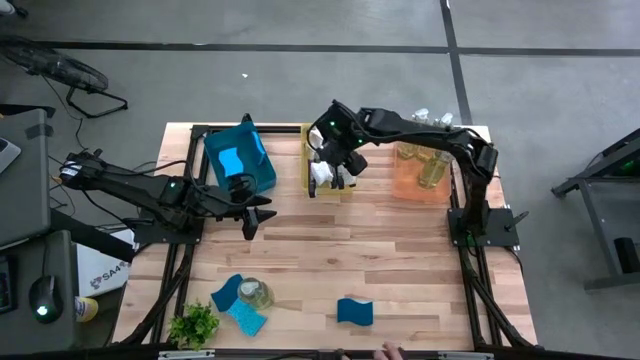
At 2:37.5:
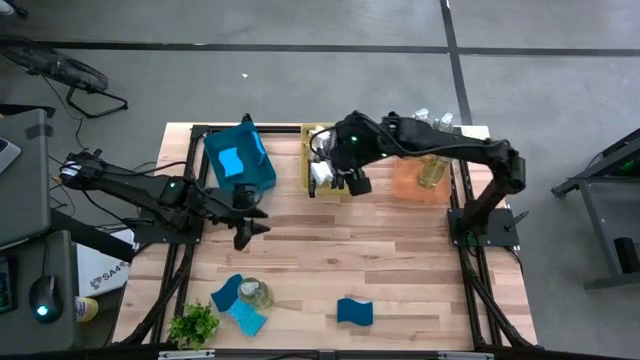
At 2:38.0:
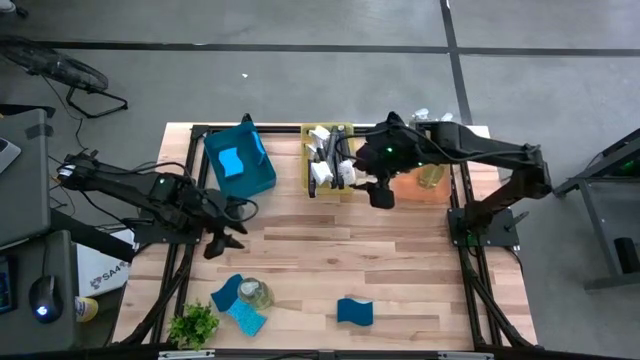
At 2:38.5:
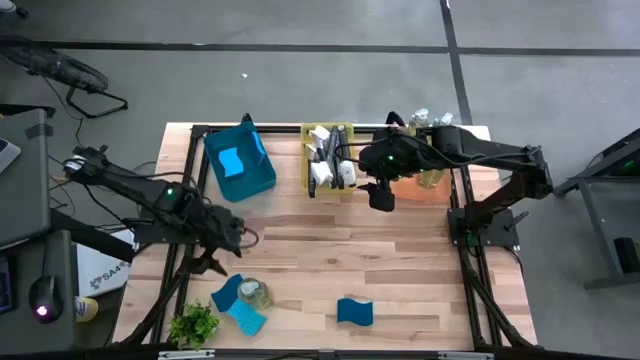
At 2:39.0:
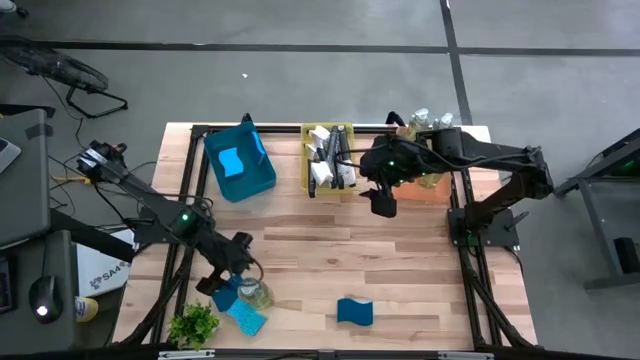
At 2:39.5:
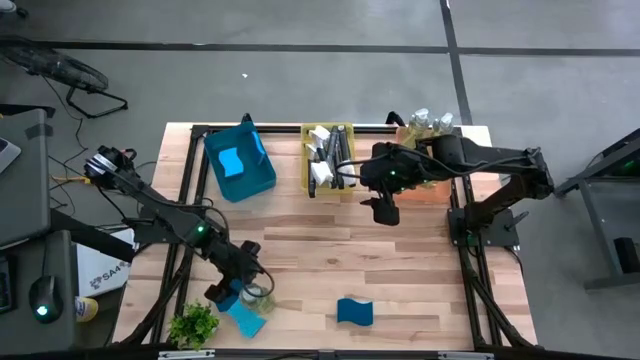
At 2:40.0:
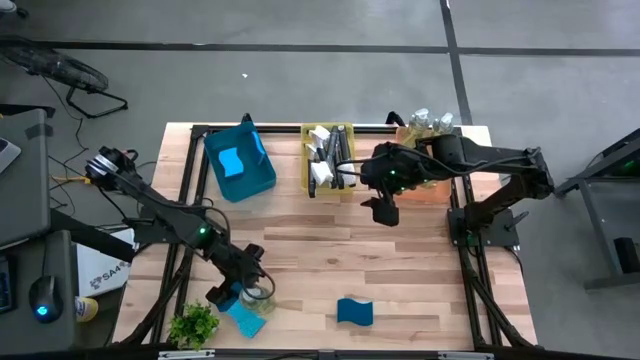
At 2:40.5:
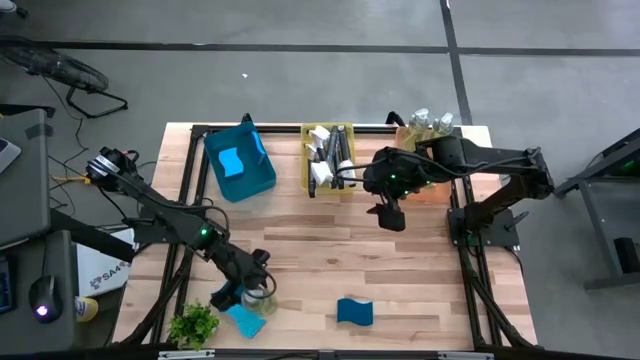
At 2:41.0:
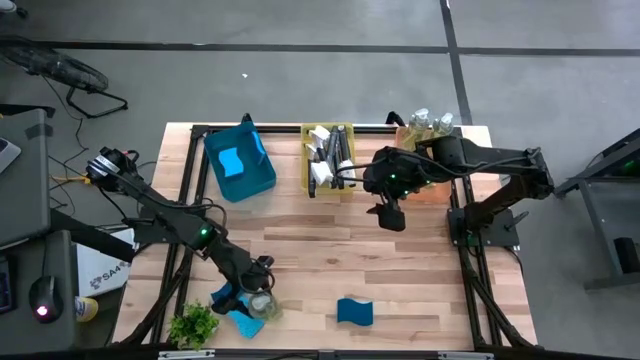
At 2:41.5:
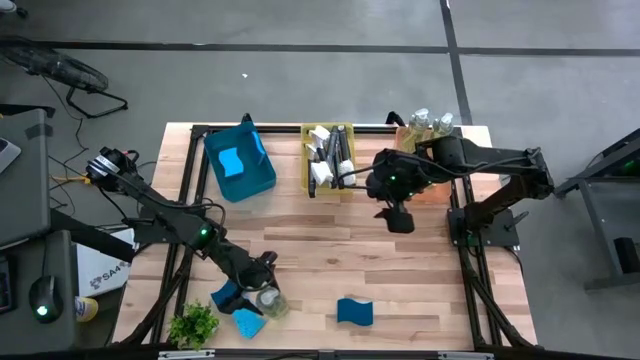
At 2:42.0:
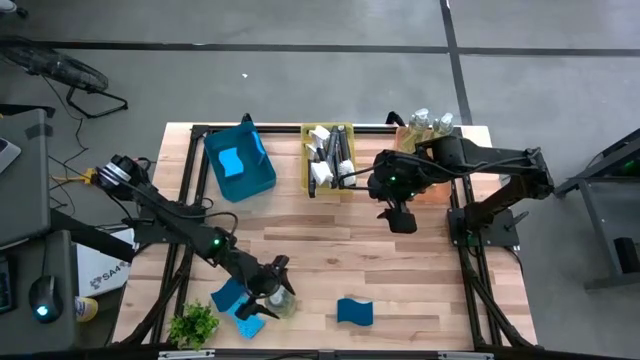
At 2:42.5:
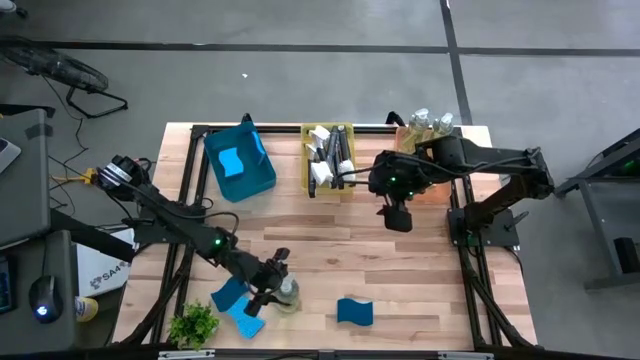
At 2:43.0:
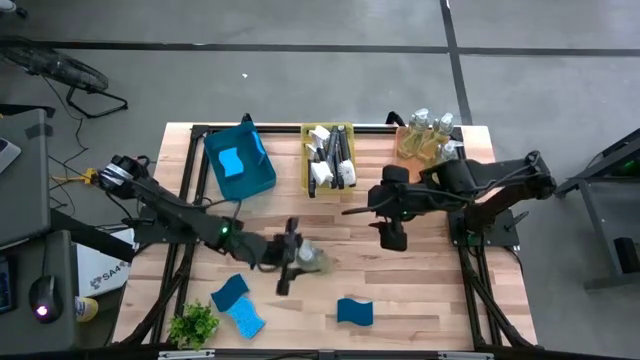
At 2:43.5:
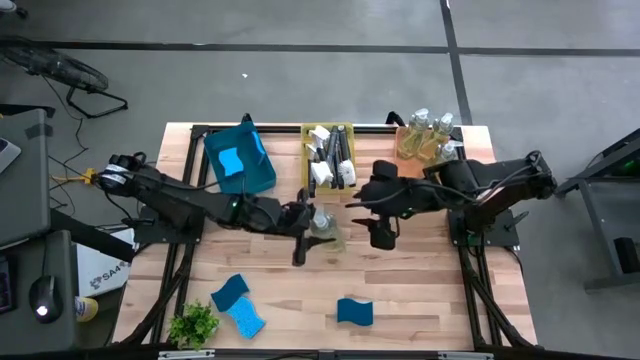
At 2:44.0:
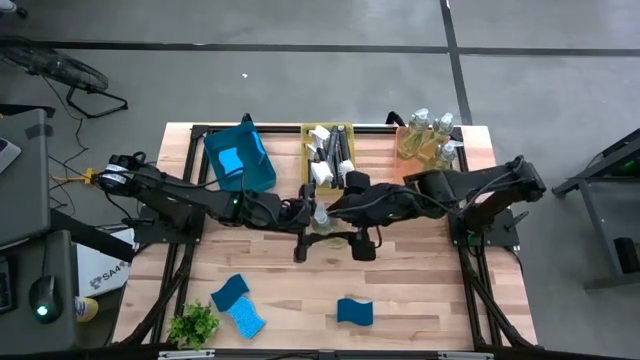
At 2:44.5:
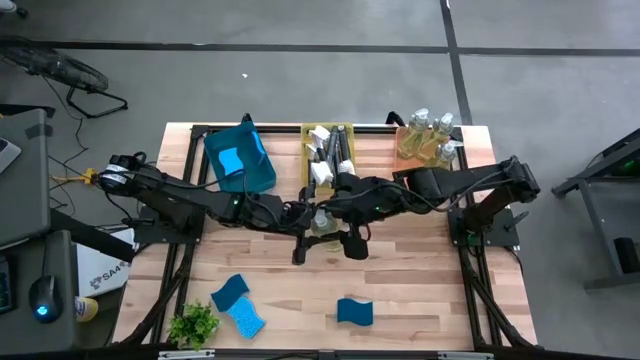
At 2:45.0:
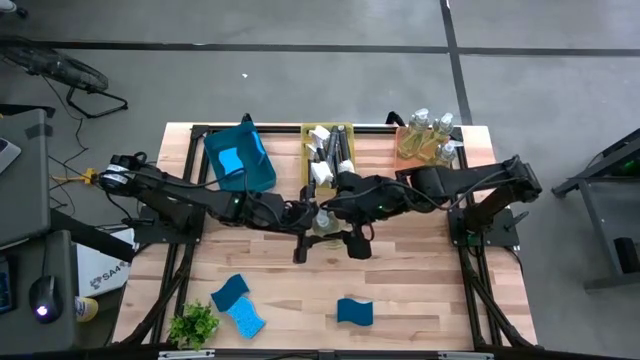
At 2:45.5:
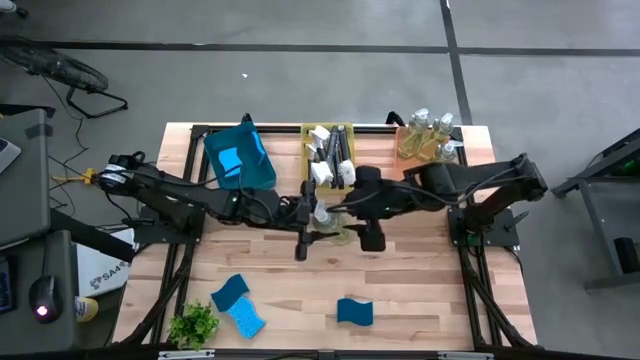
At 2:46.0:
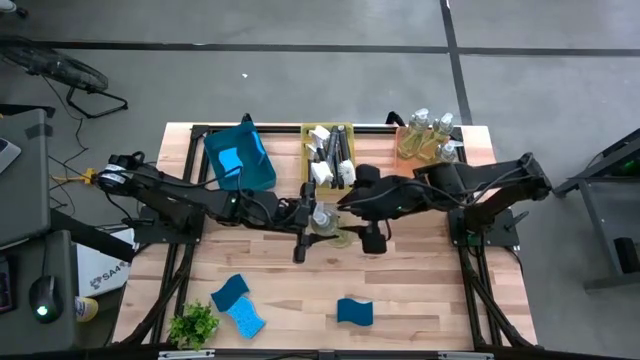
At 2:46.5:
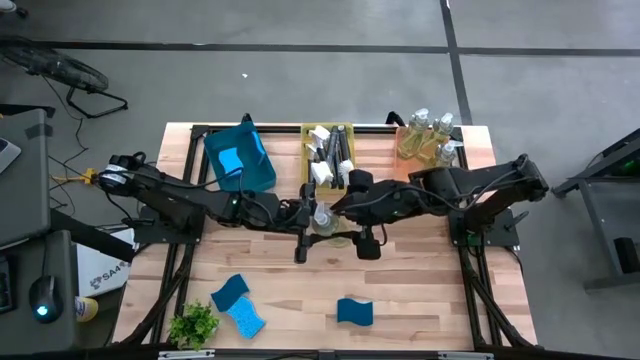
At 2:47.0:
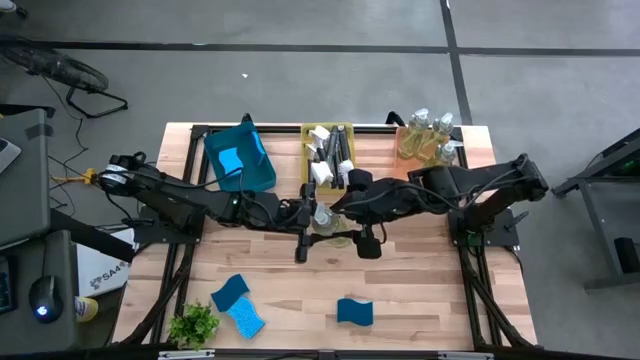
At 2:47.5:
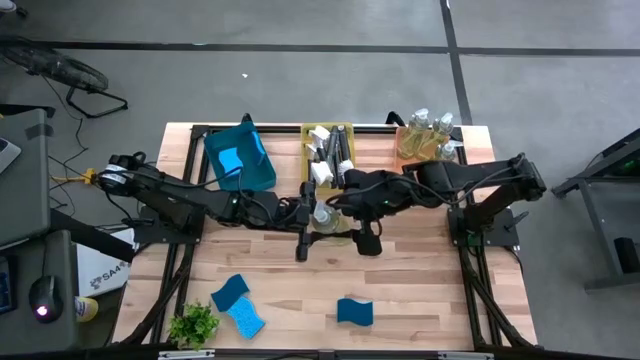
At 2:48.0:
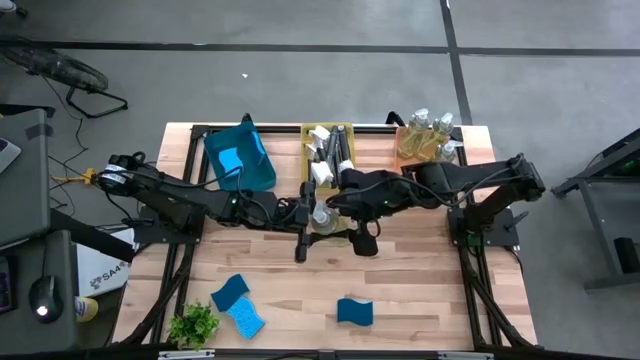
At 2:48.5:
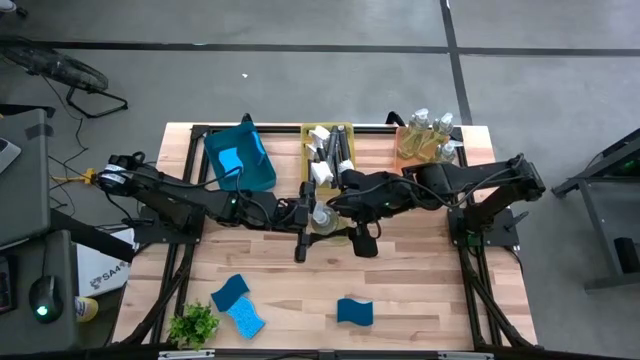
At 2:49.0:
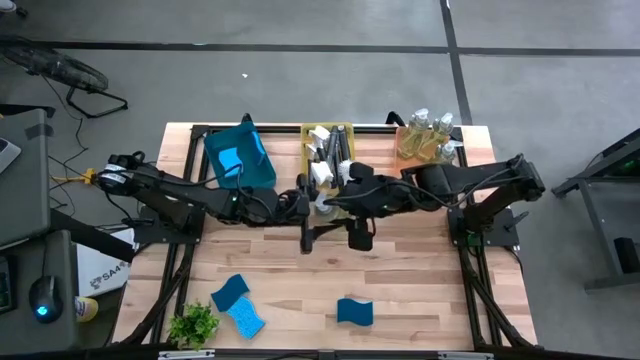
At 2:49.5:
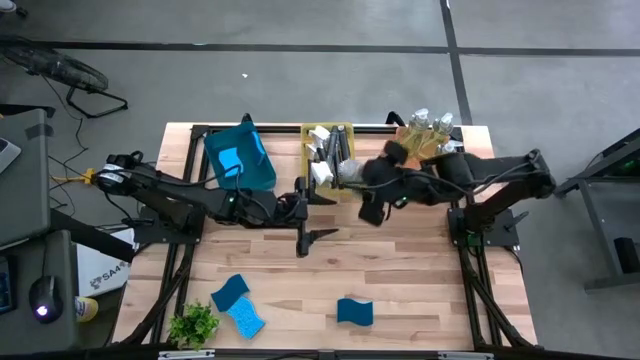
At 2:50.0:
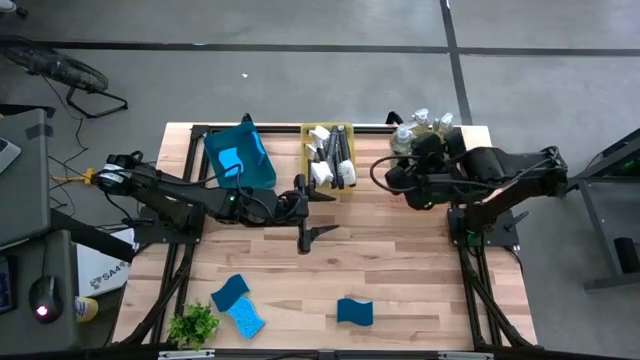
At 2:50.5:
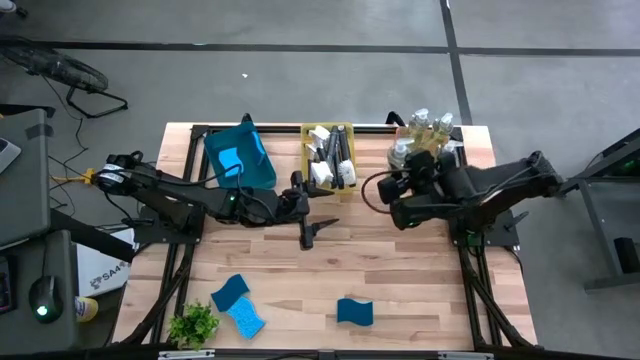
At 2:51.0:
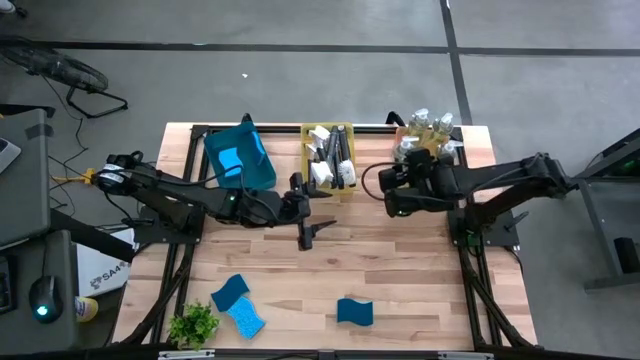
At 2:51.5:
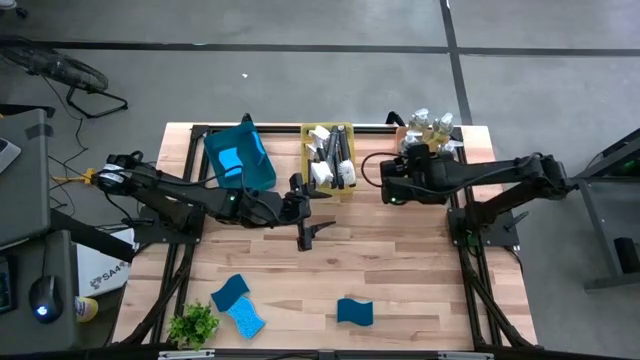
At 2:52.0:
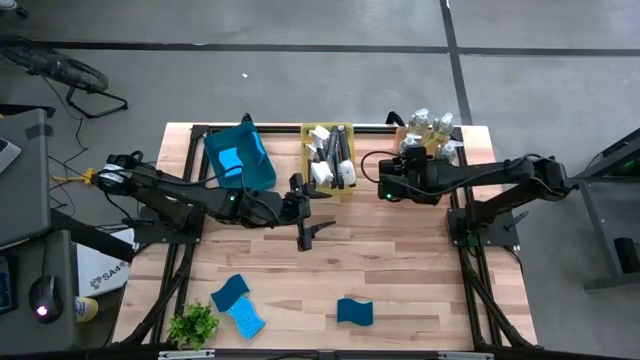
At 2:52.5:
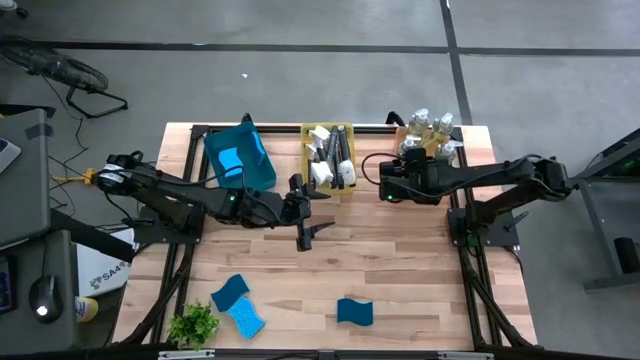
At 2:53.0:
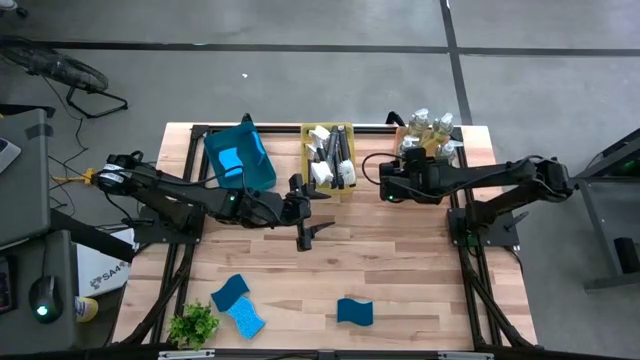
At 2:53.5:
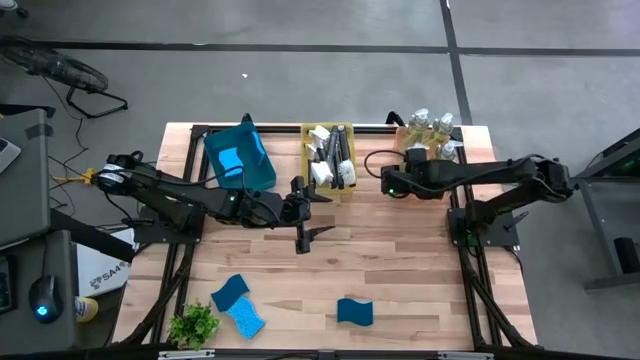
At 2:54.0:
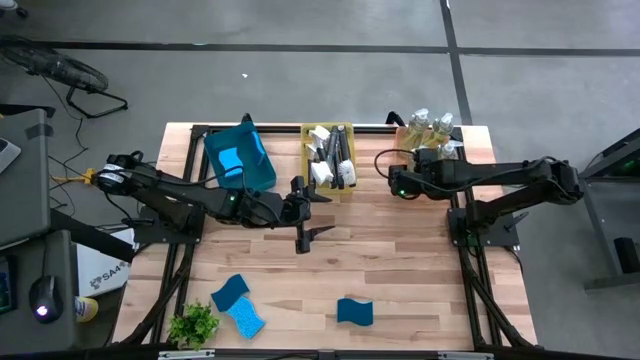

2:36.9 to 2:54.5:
Task: Pick & Place Kitchen Sink Supplies
Put the green dishwashing liquid dispenser into the orange bin

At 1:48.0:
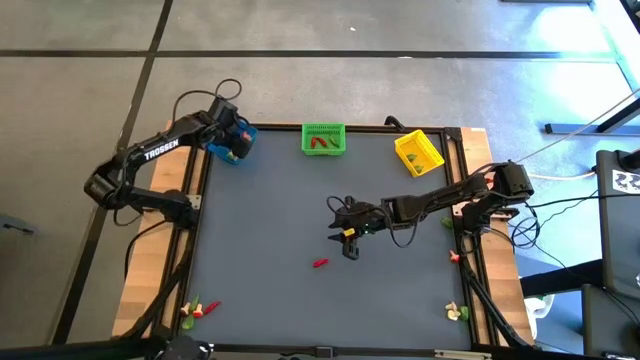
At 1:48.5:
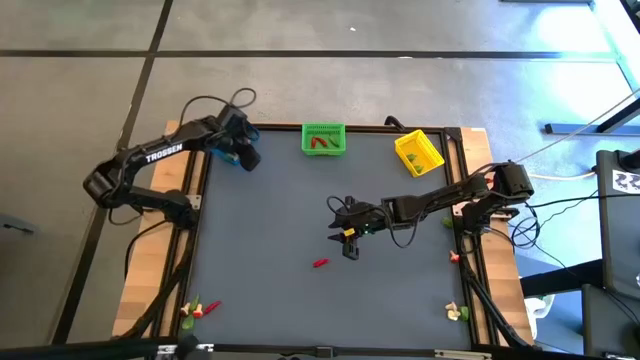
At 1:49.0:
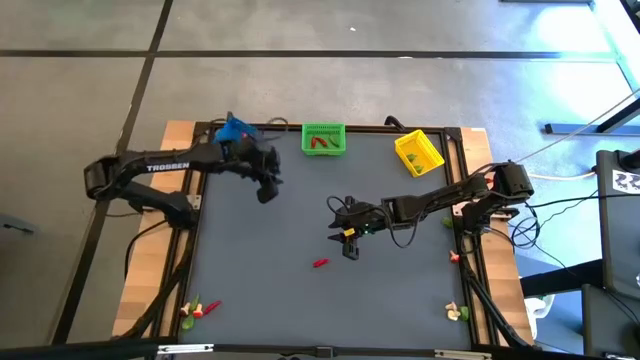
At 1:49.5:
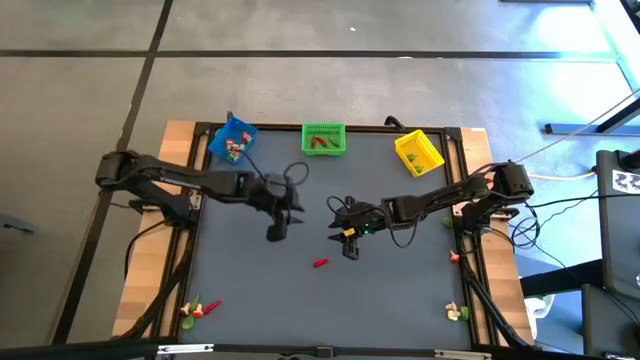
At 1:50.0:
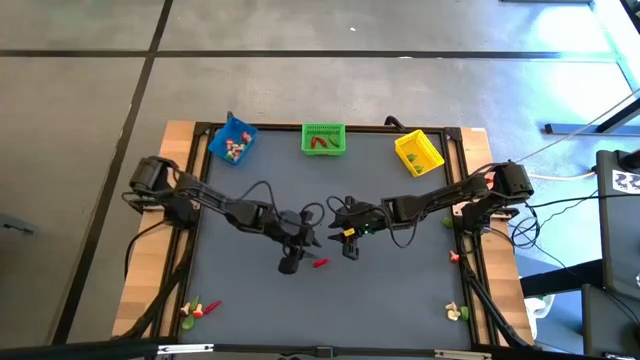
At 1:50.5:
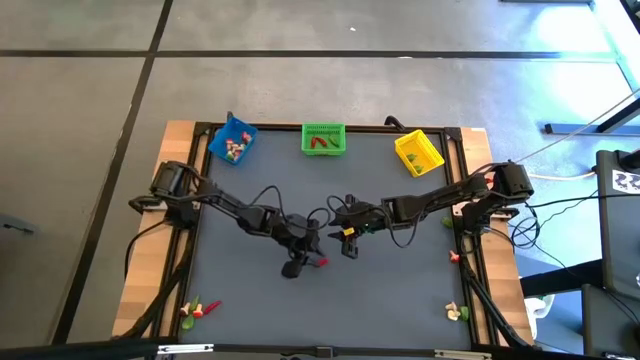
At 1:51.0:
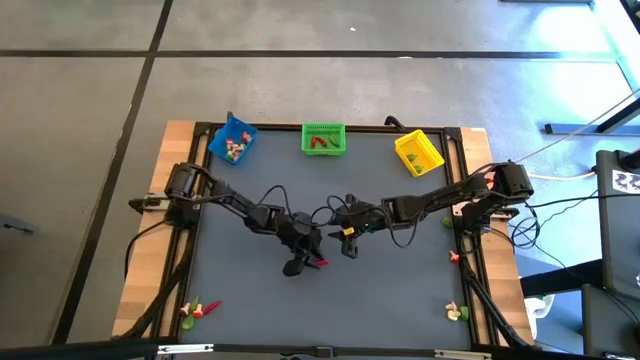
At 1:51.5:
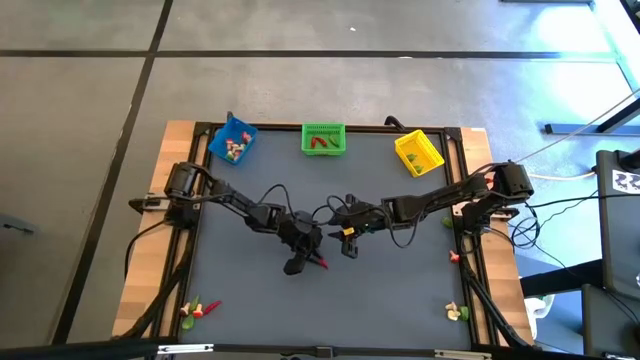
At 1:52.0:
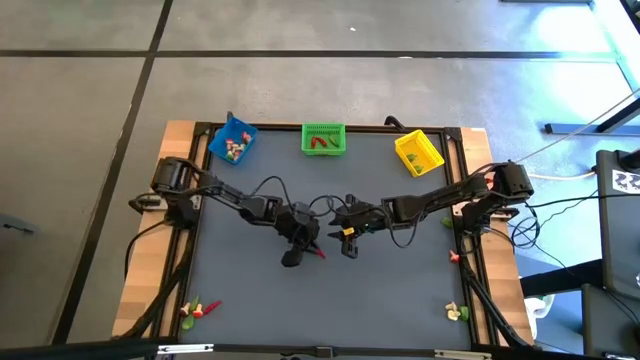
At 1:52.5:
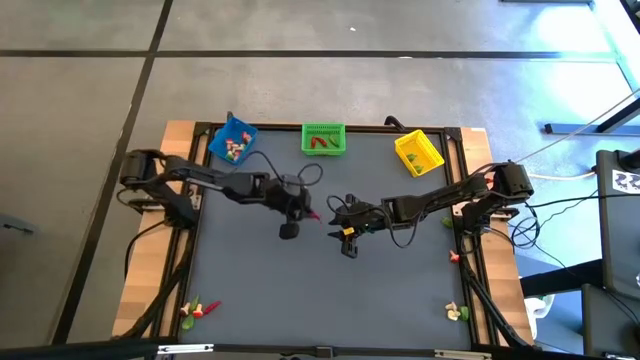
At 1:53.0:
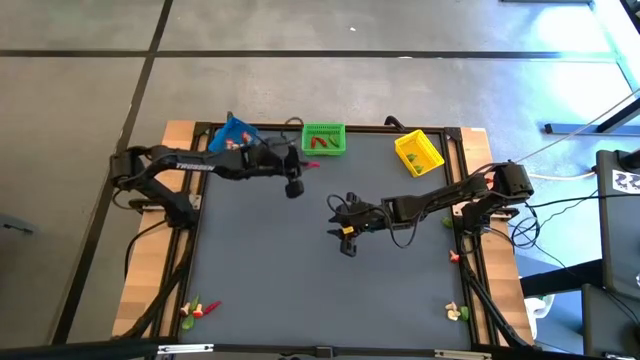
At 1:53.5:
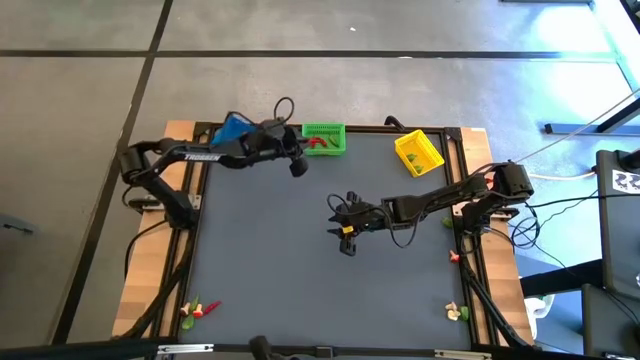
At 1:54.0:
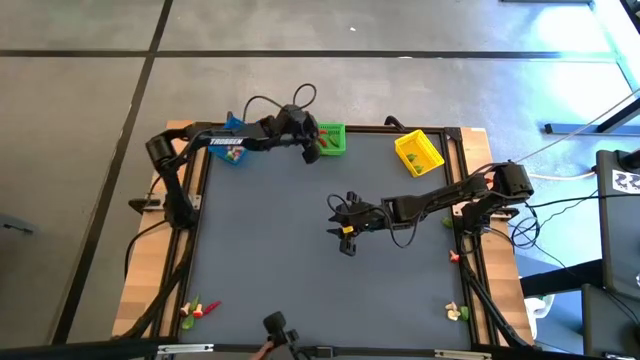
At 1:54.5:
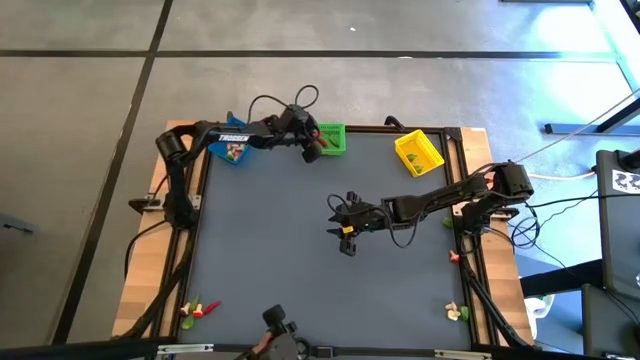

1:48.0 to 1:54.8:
Task: Sort produce into baskets
Put the red chili pepper into the green bin
